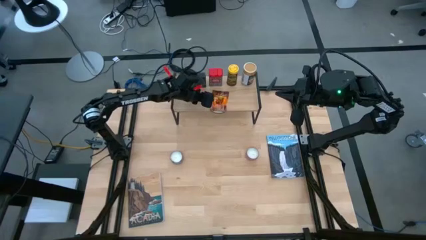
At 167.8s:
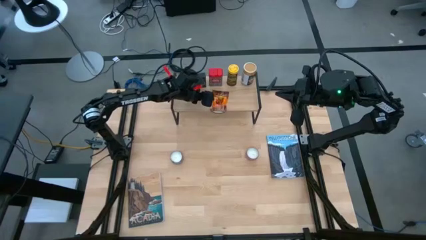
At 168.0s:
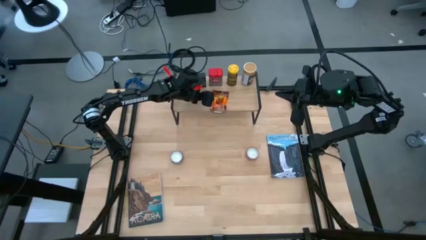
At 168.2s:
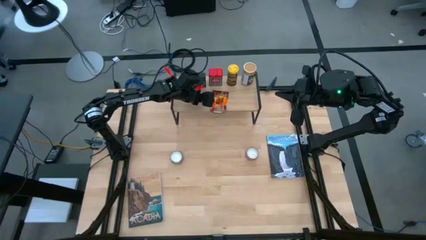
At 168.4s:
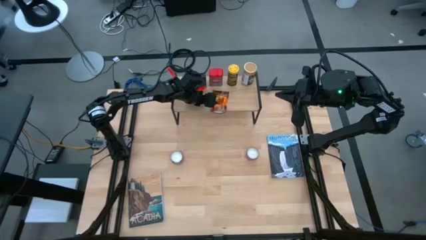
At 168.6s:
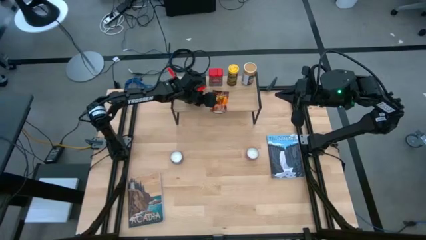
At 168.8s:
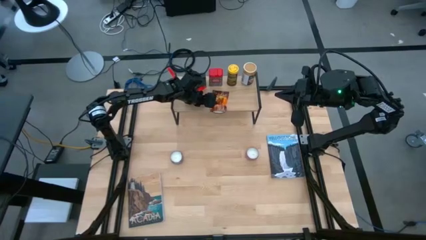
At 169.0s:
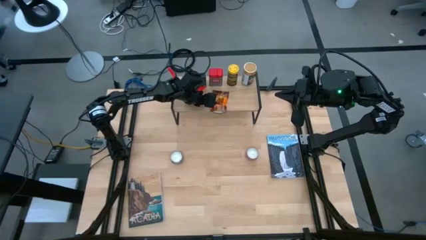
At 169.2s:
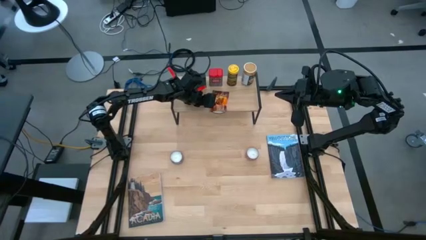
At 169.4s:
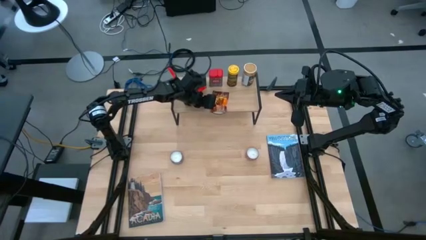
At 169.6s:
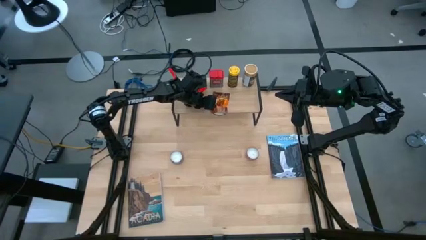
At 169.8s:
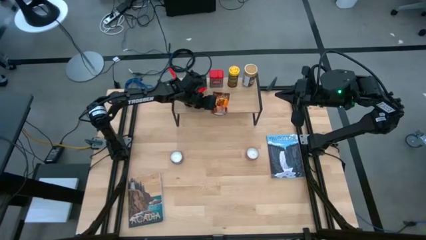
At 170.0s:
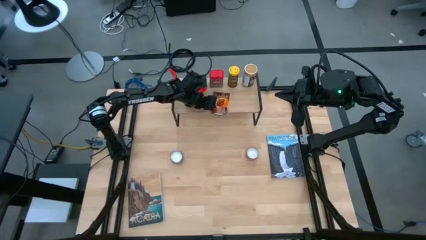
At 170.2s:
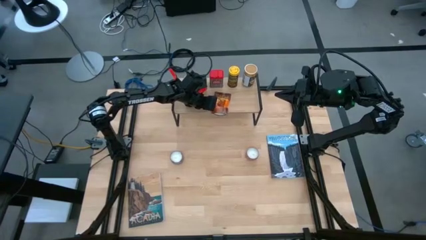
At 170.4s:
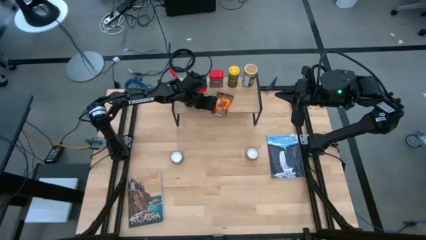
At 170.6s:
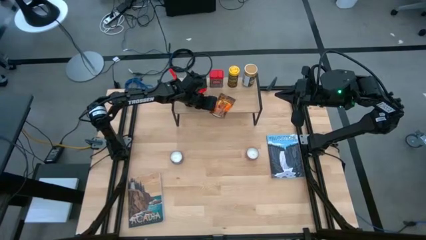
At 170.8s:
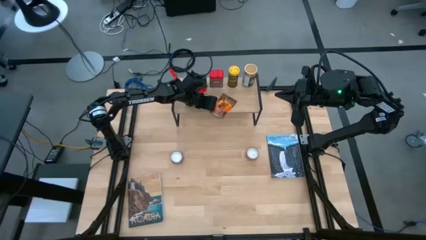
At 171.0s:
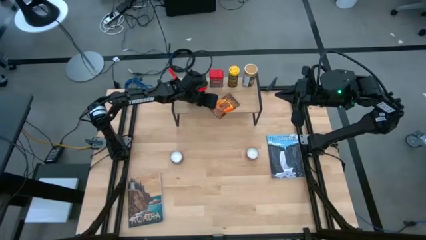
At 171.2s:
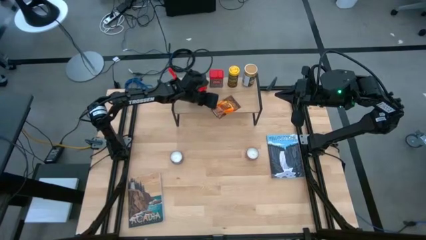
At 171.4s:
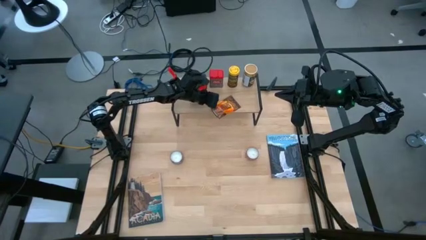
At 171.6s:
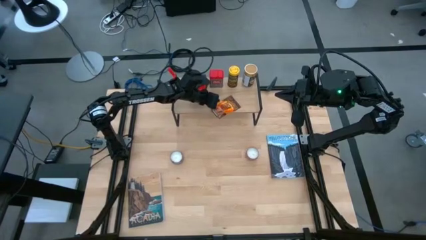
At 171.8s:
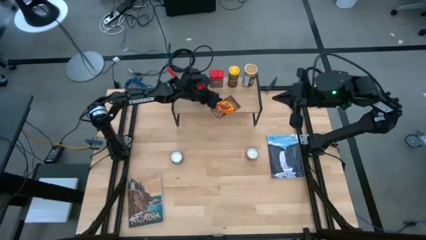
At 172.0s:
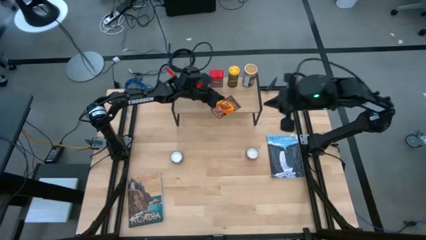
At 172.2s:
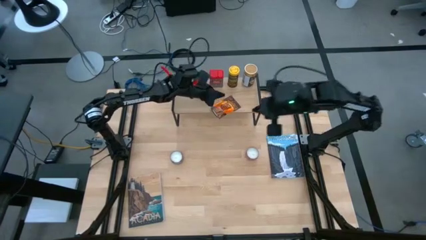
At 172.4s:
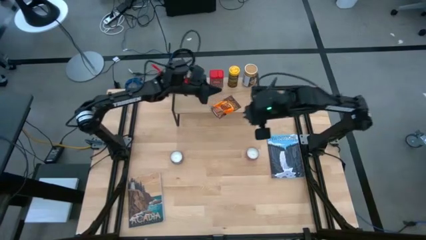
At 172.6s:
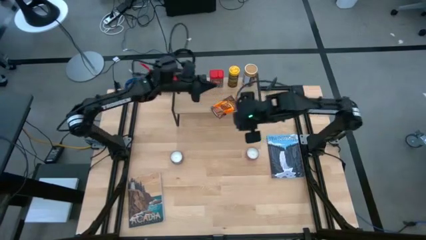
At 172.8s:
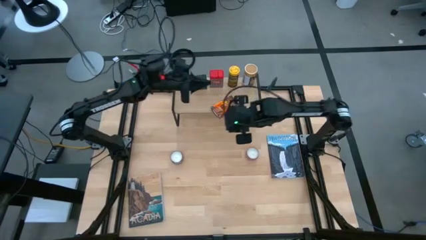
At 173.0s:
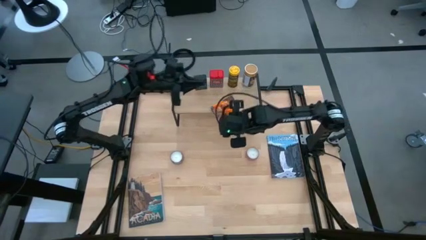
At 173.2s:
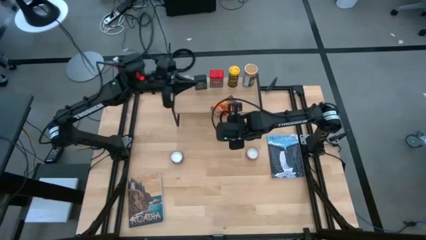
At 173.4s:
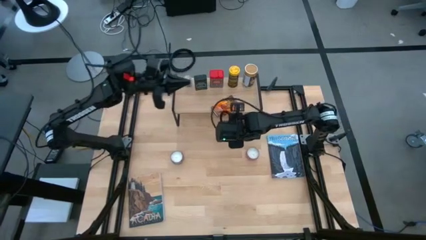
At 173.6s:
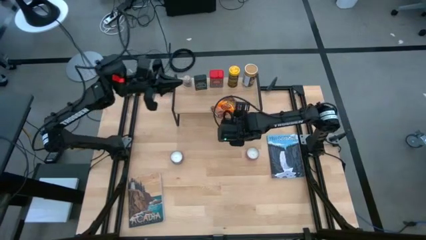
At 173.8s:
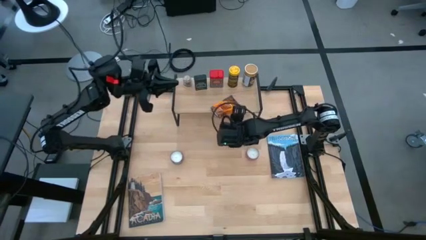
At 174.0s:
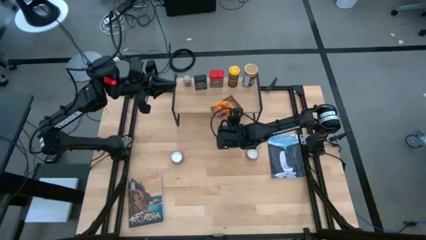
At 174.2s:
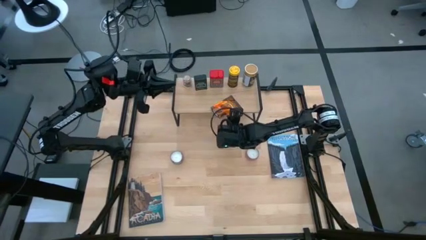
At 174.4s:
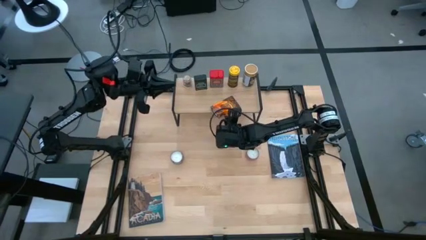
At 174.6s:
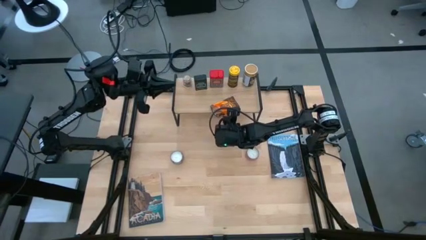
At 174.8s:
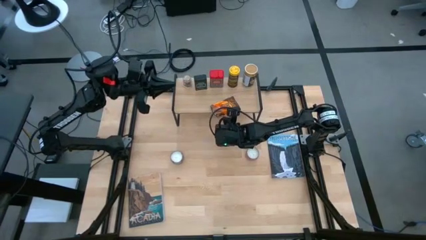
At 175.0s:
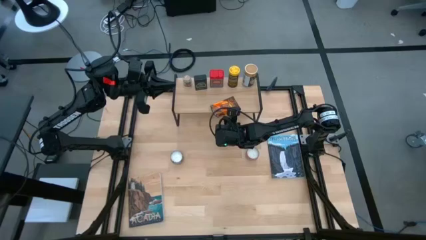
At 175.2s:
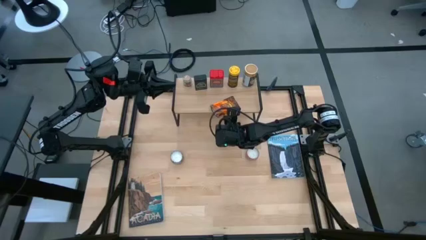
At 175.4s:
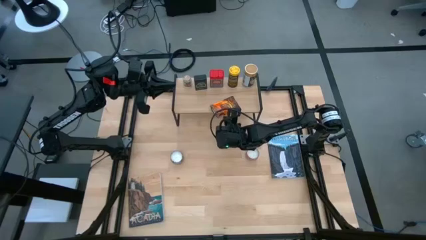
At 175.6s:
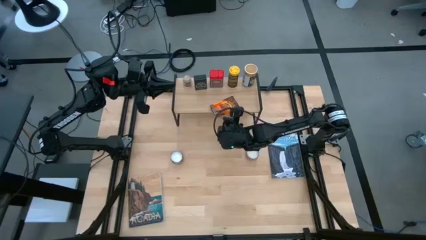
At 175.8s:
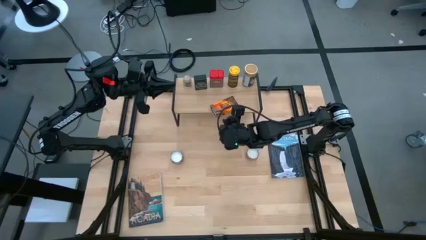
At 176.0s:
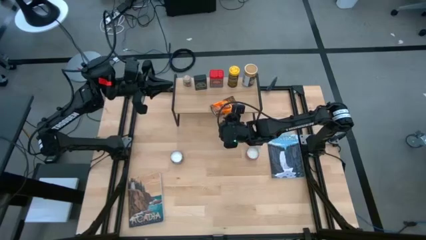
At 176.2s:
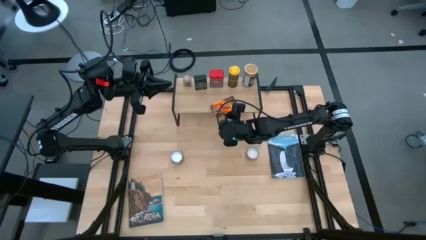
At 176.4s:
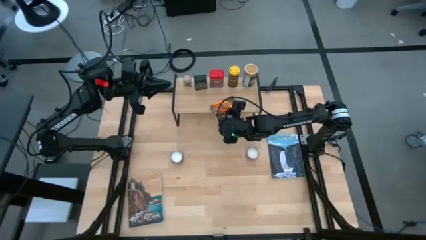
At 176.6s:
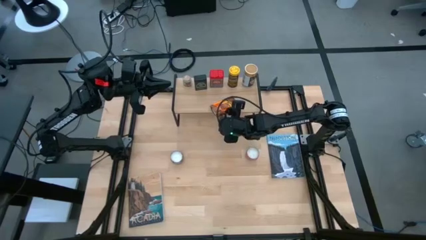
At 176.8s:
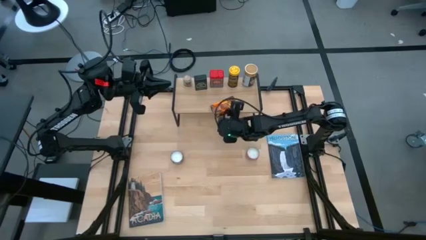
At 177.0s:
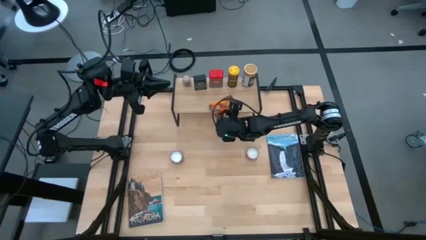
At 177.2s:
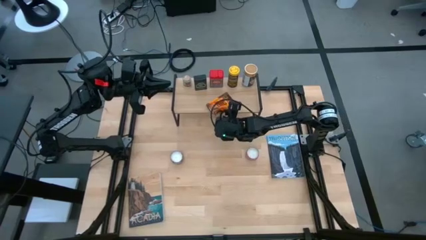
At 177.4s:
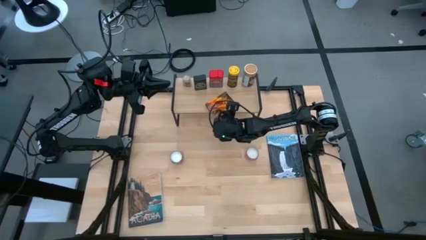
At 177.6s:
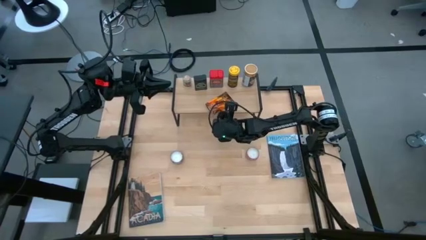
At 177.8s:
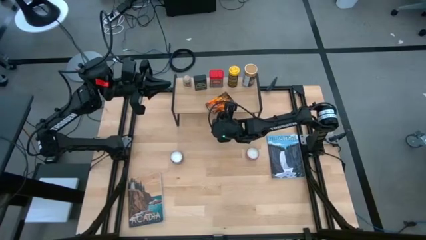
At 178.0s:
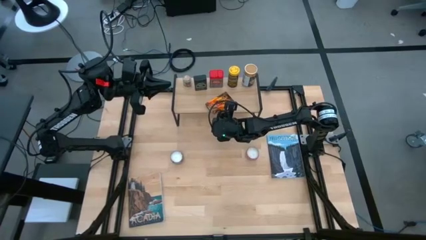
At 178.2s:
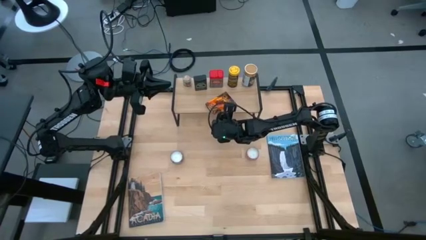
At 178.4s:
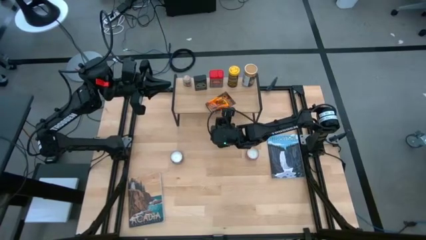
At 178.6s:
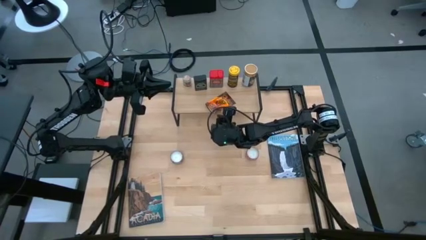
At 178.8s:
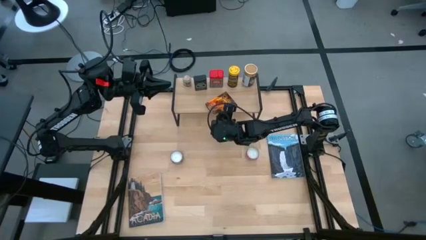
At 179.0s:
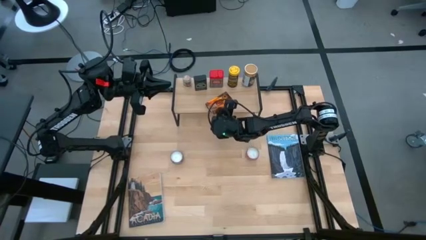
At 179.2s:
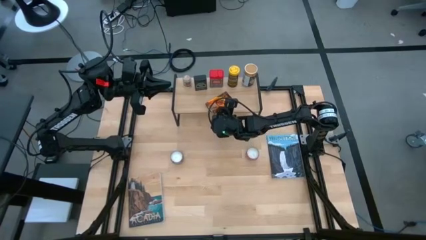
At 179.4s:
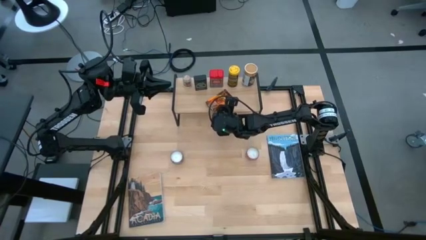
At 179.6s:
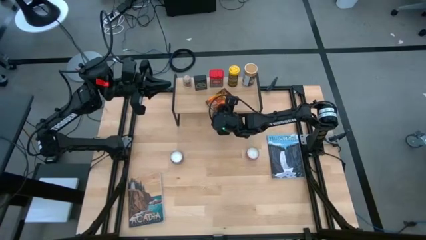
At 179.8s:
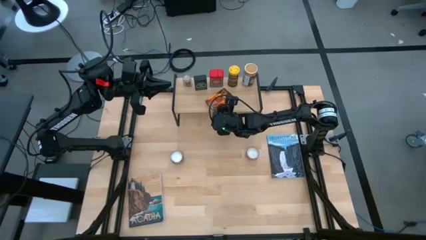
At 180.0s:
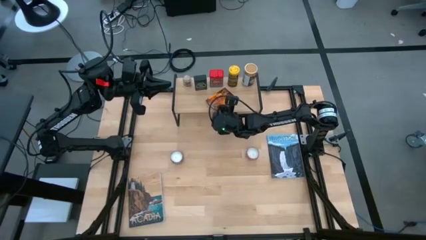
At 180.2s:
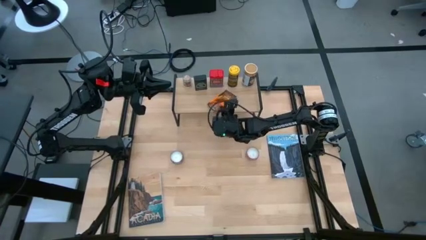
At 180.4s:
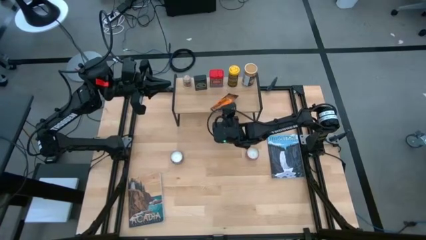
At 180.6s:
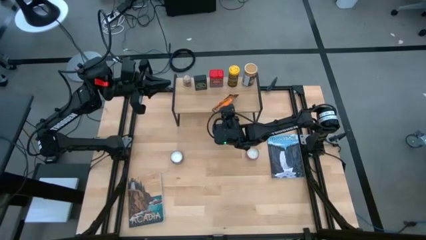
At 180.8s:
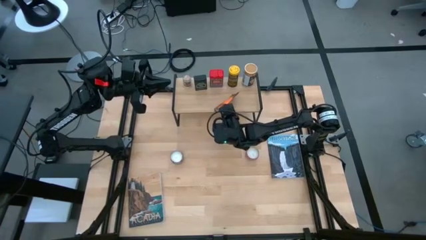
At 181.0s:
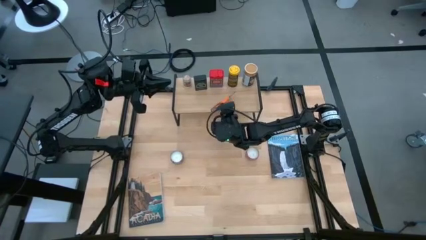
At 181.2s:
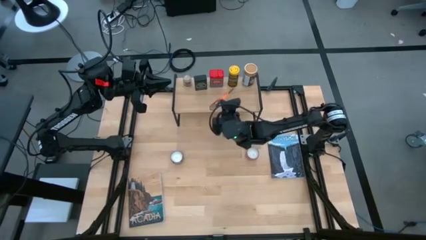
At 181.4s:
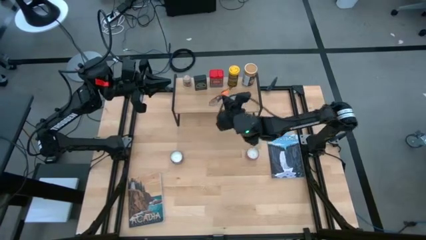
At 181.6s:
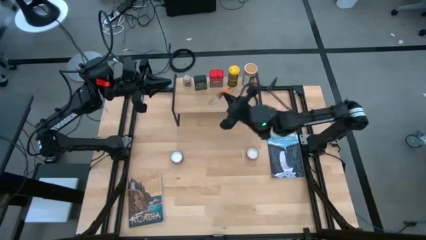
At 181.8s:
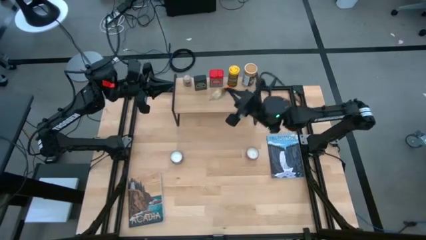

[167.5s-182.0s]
Task: Shelf spices
Put the orange seasoning pack on the shelf

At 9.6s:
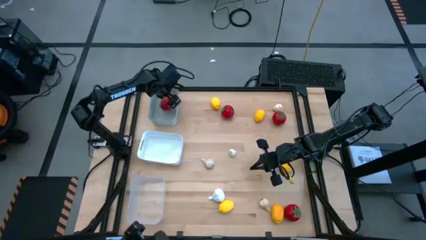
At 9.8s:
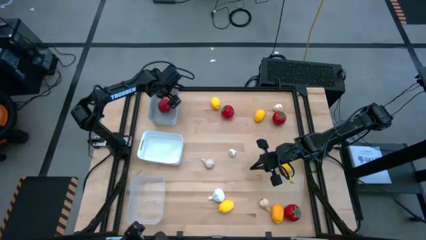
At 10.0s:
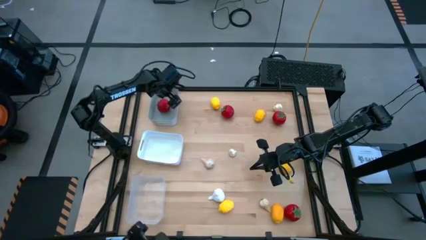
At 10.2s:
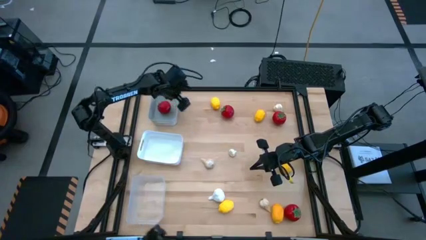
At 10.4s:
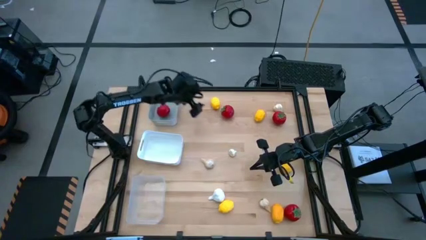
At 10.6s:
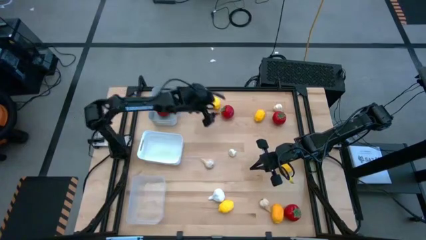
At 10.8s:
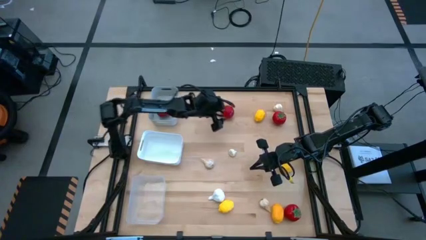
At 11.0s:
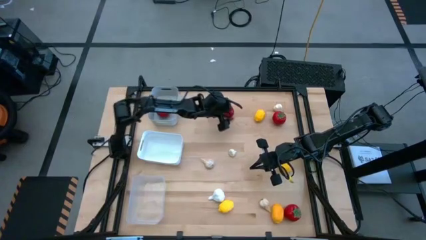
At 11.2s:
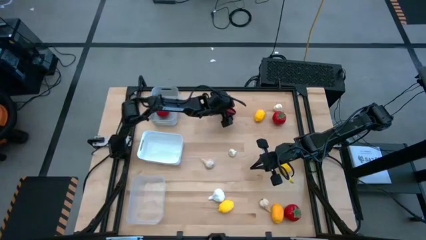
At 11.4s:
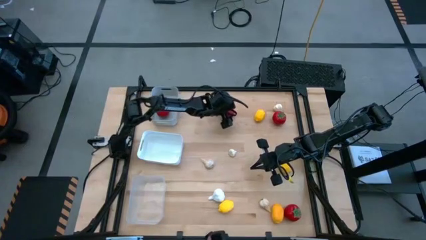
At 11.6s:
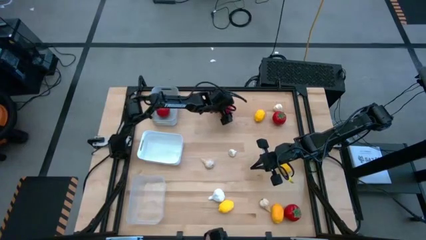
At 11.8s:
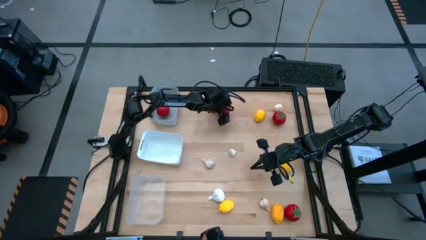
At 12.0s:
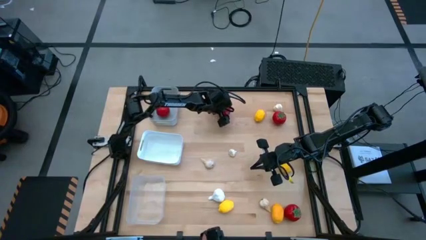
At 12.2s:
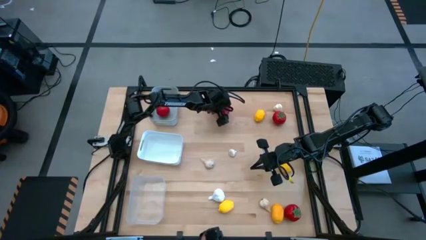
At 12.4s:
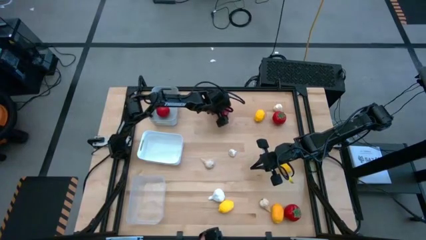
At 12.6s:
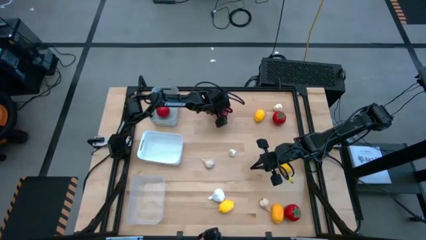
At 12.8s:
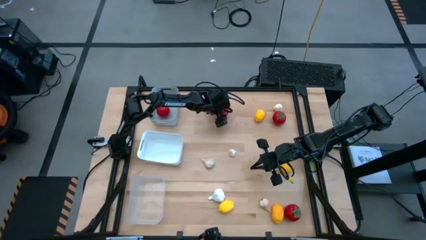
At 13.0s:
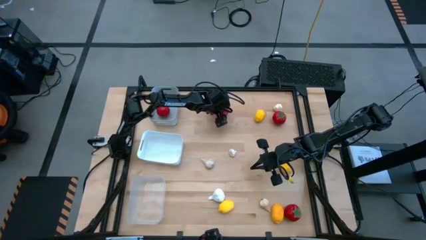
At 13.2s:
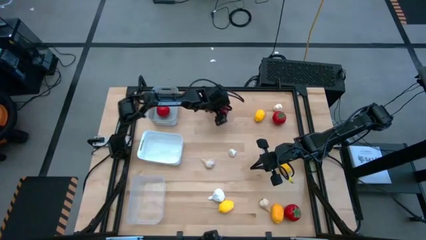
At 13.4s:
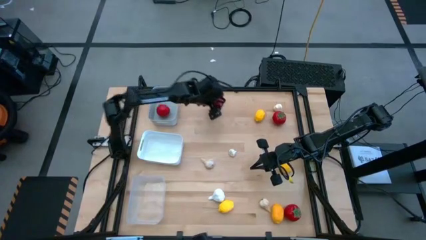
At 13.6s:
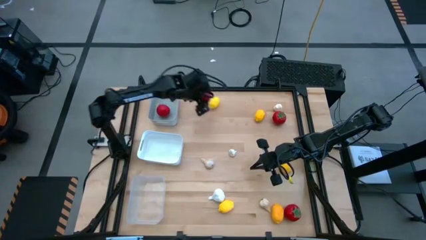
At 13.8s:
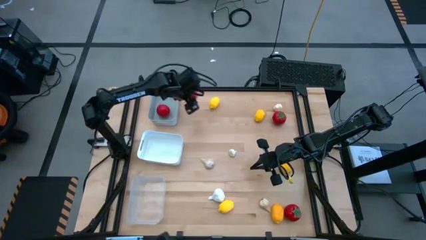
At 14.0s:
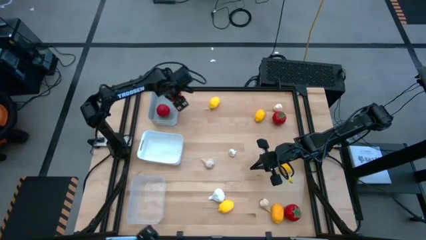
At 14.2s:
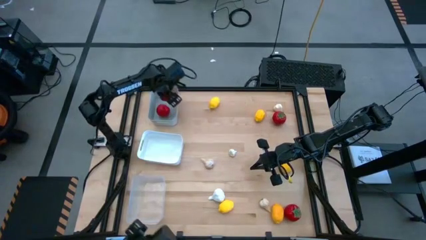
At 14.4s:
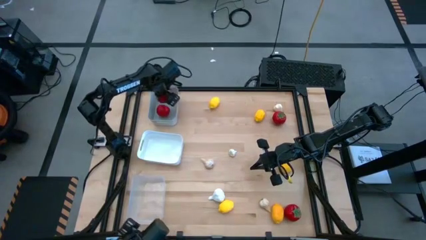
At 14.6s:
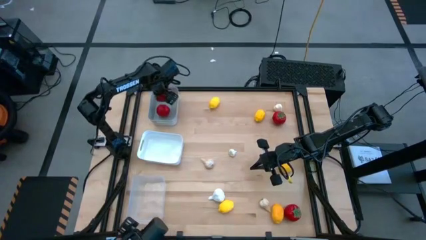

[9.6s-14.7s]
Task: Sort produce into baskets
Put the red tomato into the gray bin
